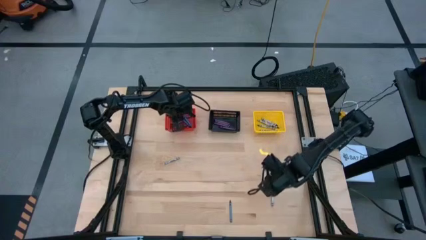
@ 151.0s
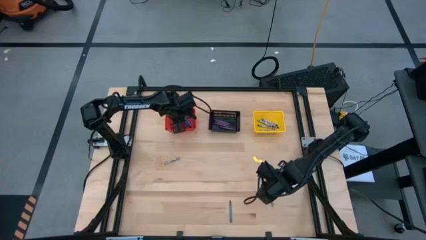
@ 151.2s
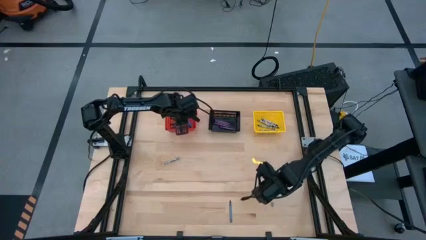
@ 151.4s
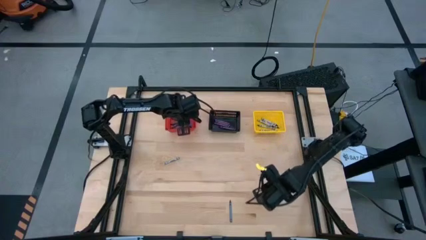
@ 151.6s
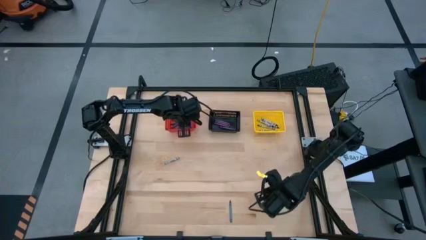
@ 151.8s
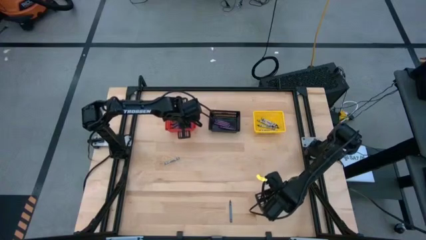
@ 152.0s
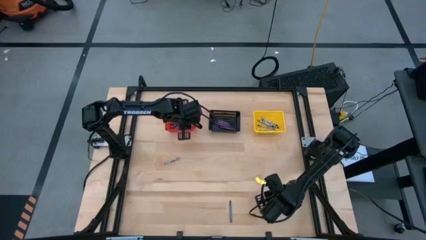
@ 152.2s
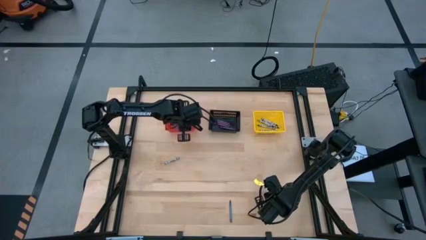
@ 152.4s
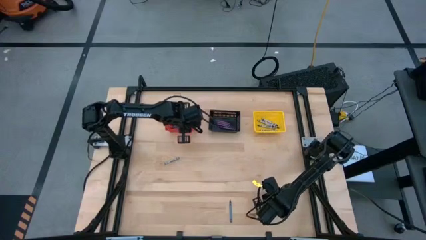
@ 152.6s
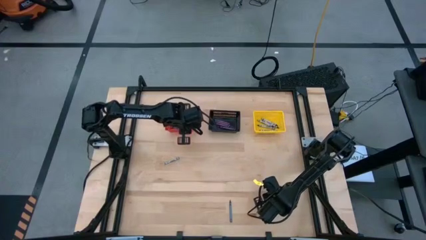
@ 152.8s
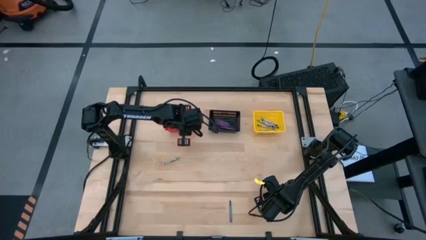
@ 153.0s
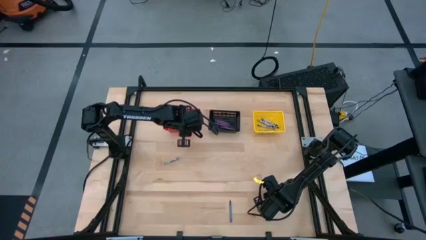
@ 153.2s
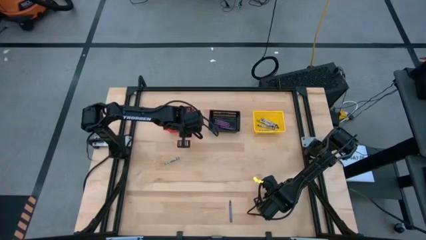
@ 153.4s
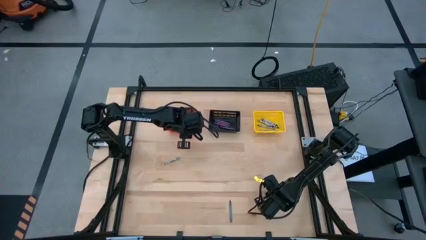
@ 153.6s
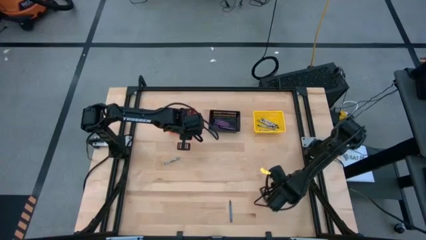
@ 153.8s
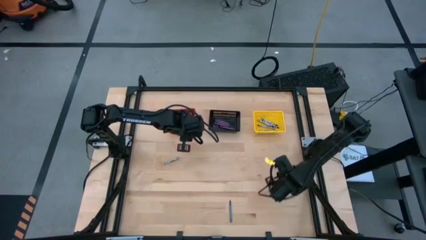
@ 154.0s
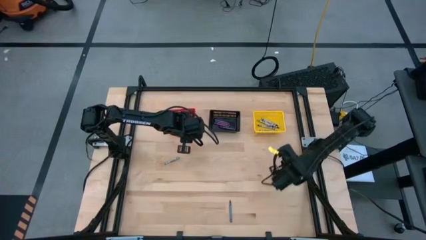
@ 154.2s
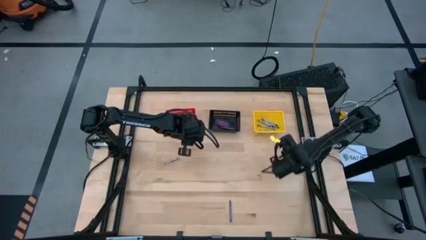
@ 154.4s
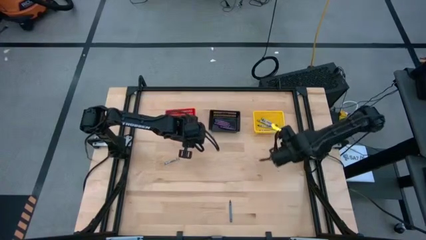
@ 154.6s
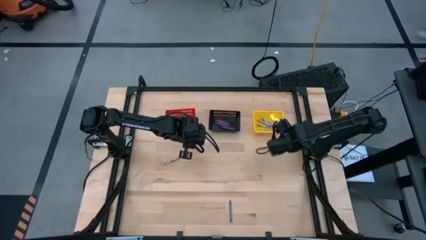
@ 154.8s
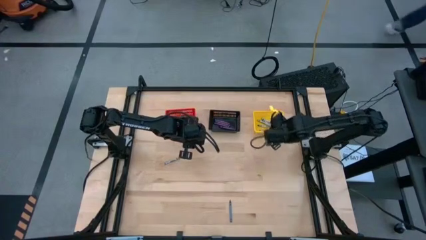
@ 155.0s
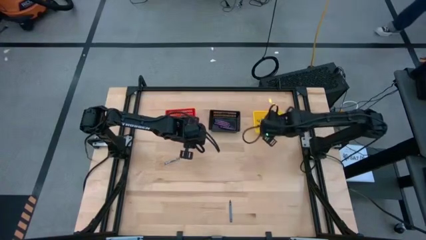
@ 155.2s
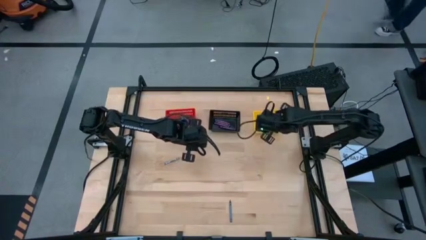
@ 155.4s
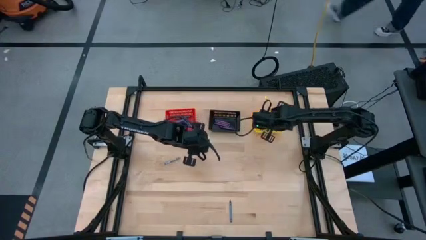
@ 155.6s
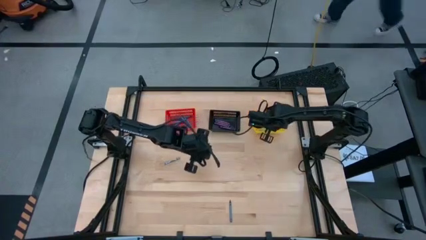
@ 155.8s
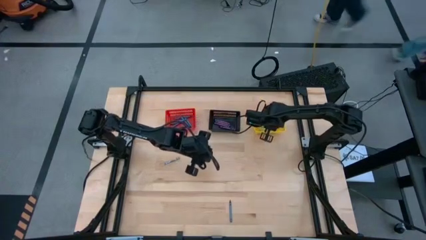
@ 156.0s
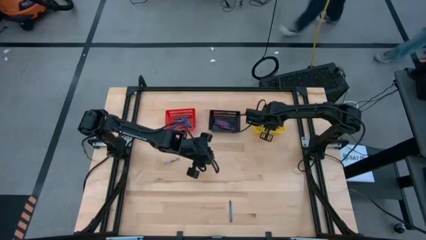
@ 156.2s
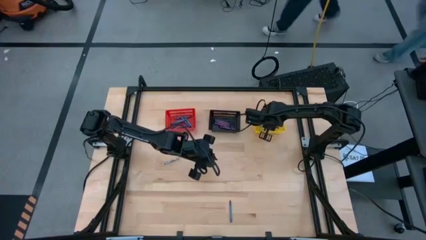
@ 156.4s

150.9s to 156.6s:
Task: Sort crayons
Put the black crayon into the yellow bin

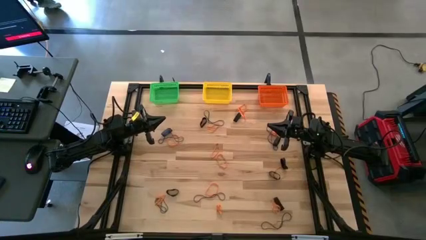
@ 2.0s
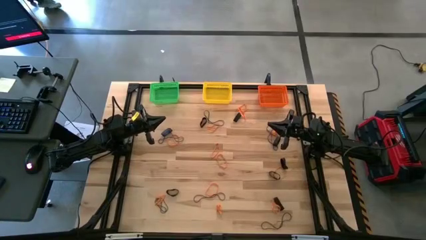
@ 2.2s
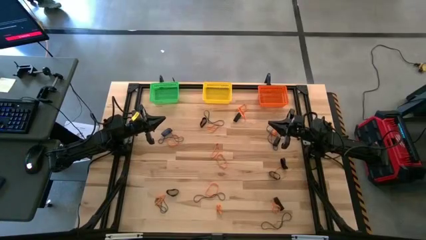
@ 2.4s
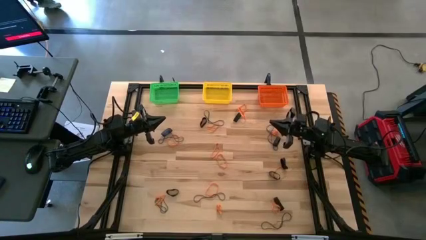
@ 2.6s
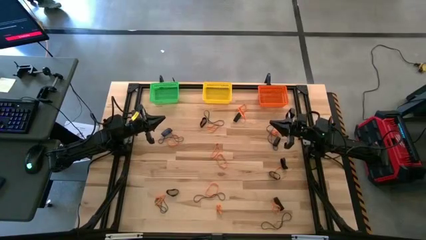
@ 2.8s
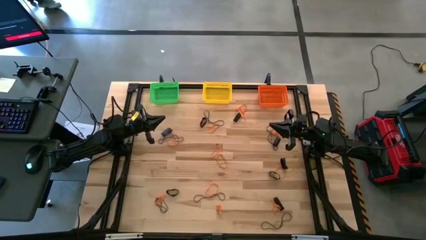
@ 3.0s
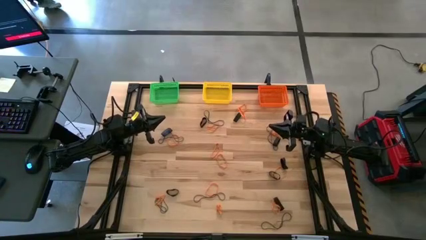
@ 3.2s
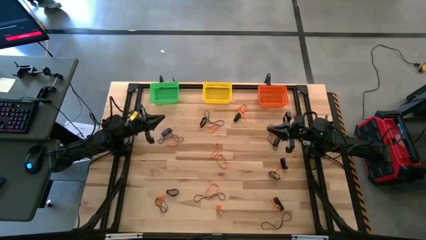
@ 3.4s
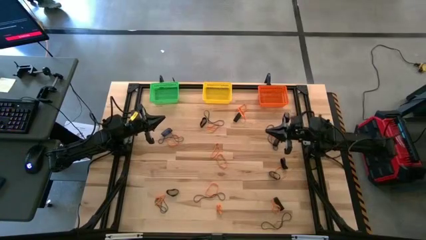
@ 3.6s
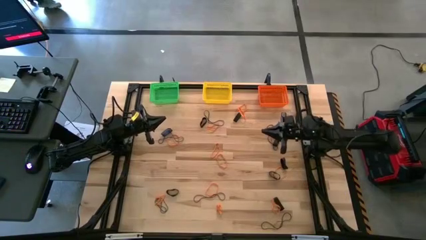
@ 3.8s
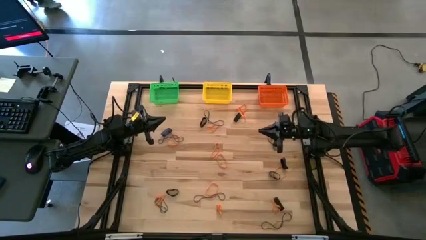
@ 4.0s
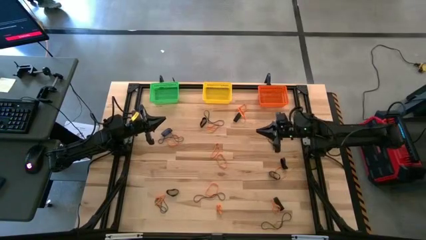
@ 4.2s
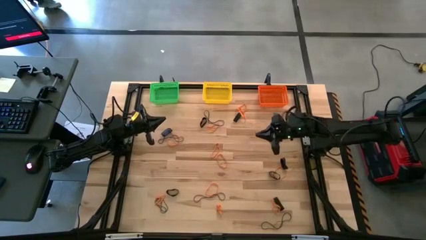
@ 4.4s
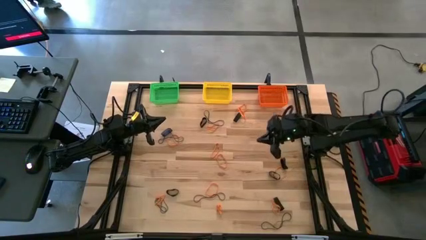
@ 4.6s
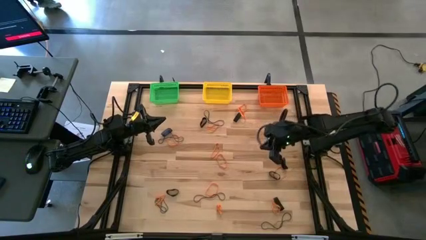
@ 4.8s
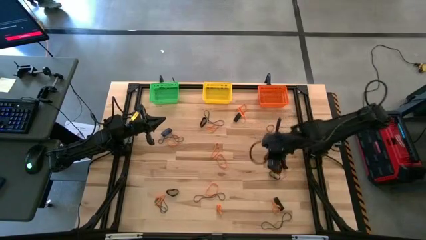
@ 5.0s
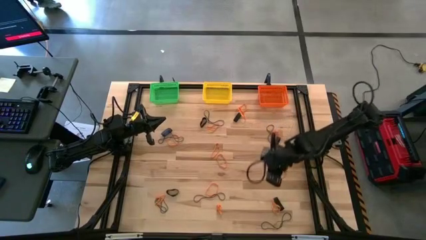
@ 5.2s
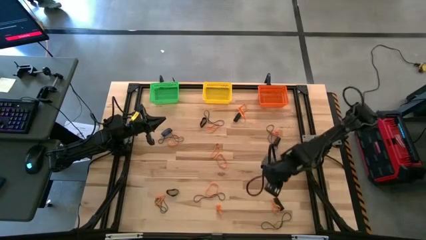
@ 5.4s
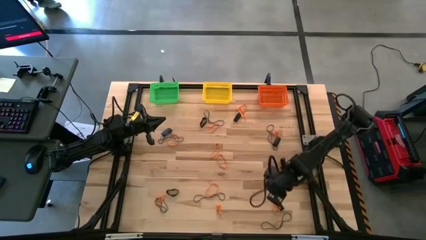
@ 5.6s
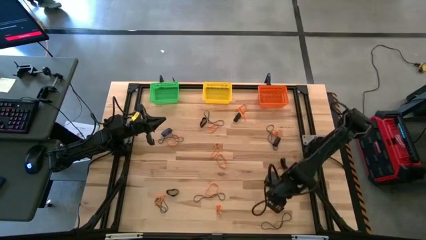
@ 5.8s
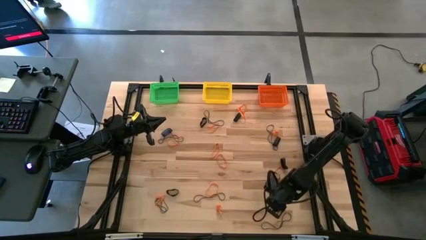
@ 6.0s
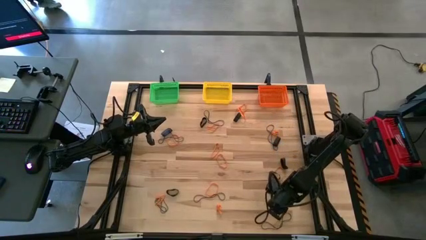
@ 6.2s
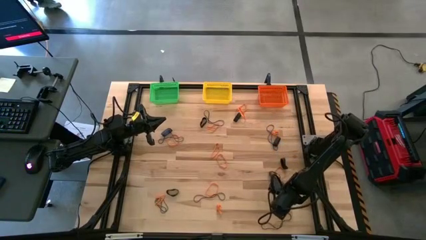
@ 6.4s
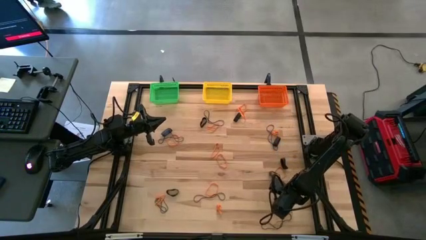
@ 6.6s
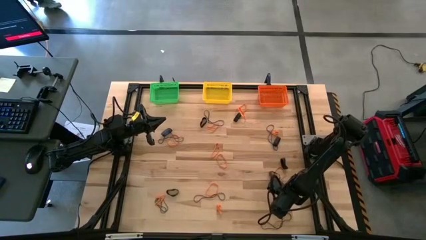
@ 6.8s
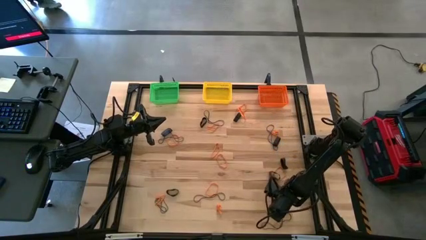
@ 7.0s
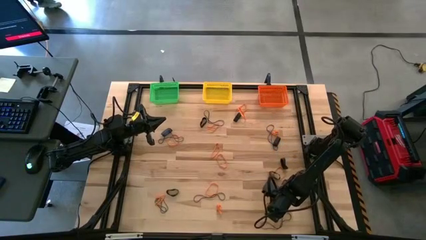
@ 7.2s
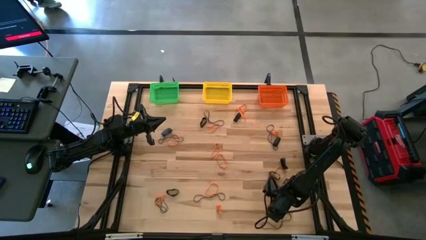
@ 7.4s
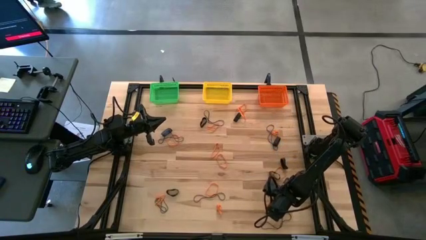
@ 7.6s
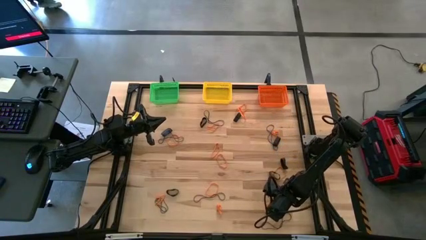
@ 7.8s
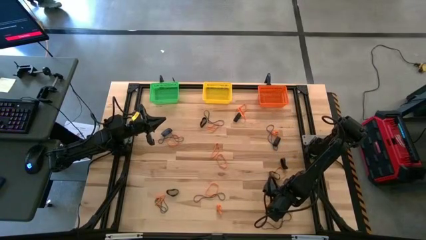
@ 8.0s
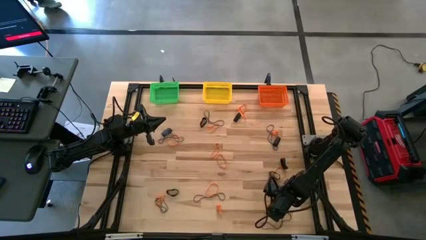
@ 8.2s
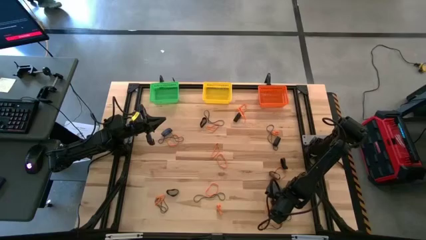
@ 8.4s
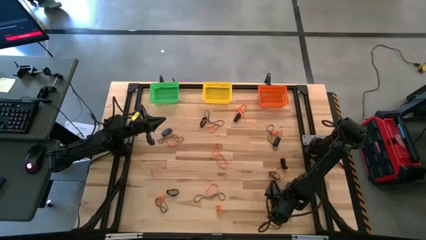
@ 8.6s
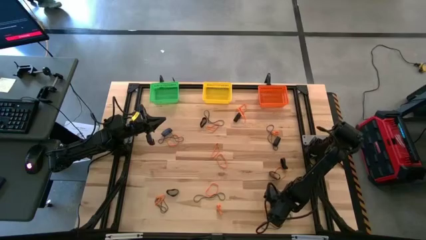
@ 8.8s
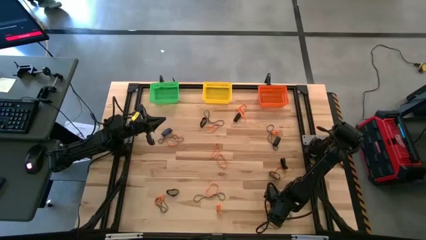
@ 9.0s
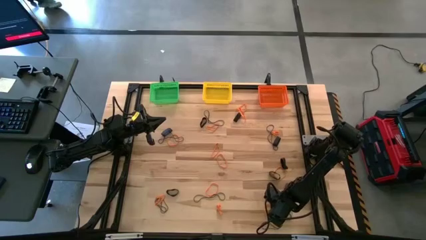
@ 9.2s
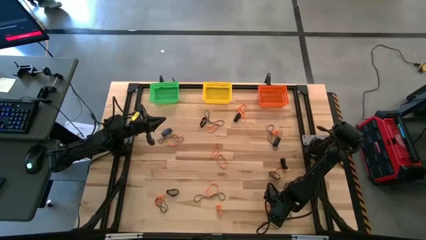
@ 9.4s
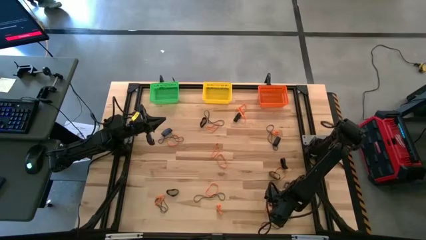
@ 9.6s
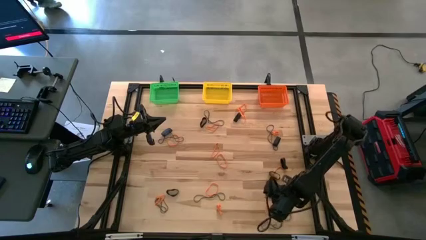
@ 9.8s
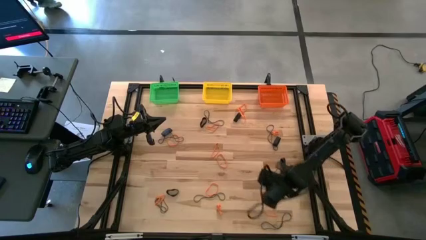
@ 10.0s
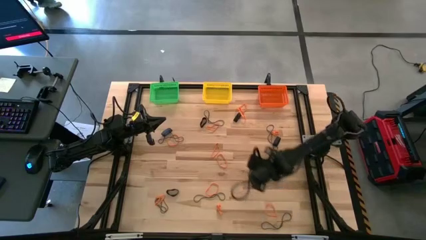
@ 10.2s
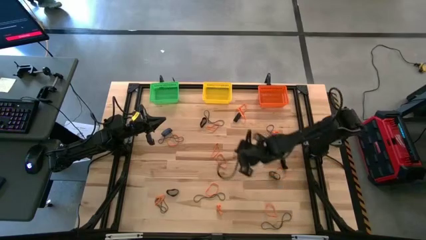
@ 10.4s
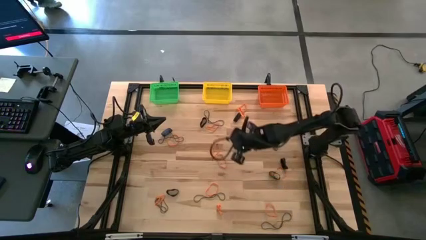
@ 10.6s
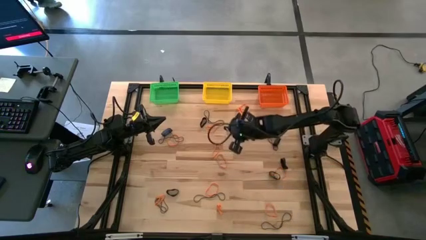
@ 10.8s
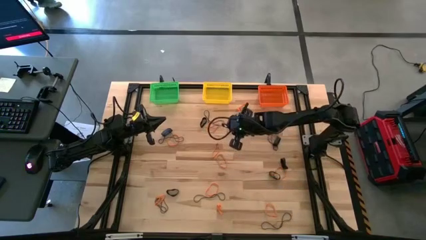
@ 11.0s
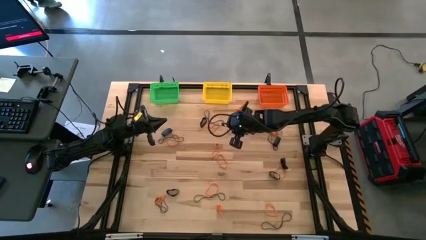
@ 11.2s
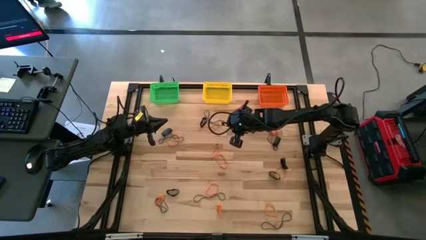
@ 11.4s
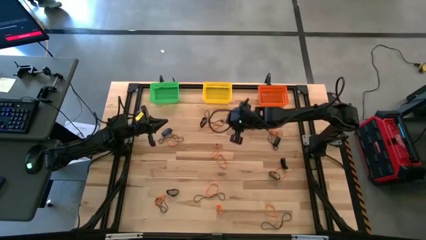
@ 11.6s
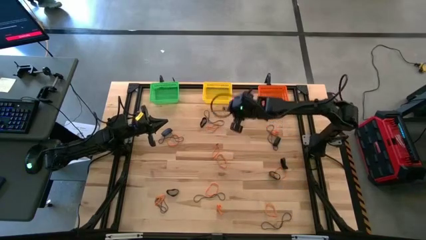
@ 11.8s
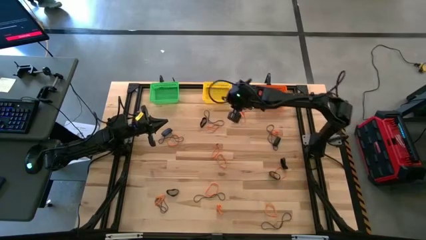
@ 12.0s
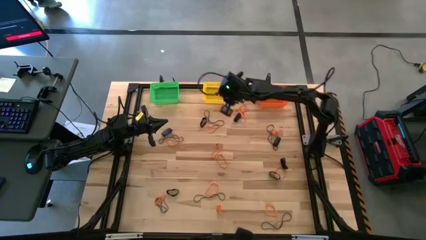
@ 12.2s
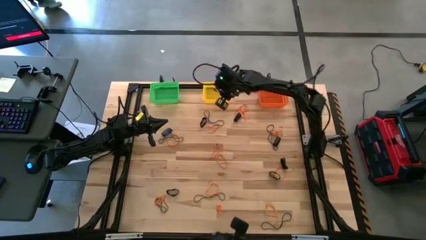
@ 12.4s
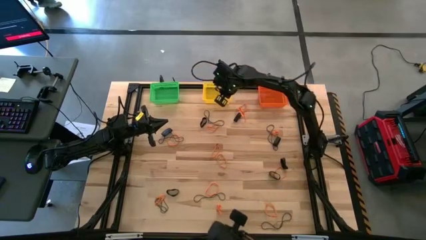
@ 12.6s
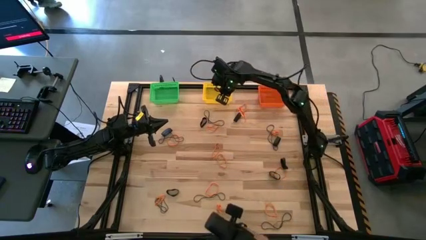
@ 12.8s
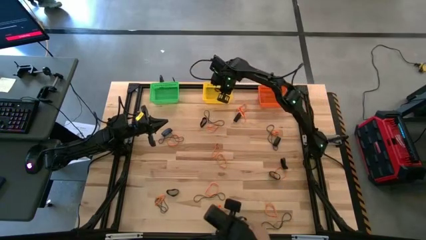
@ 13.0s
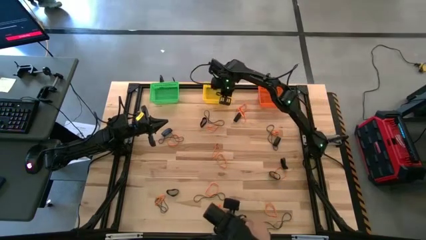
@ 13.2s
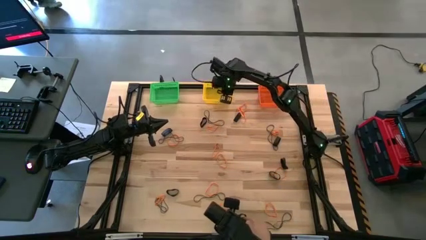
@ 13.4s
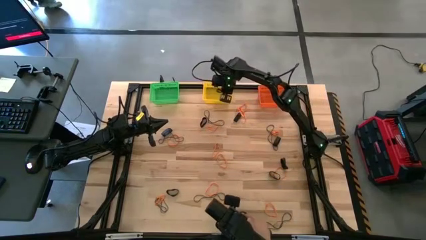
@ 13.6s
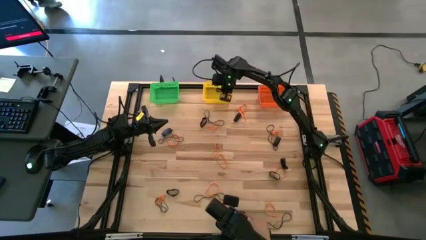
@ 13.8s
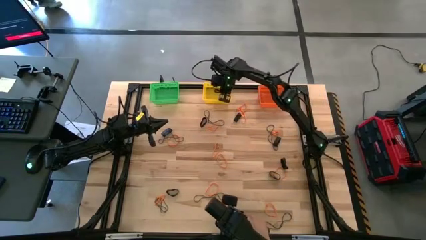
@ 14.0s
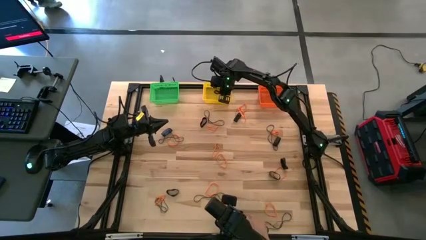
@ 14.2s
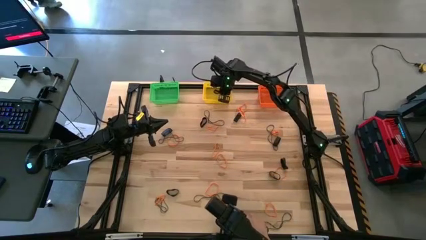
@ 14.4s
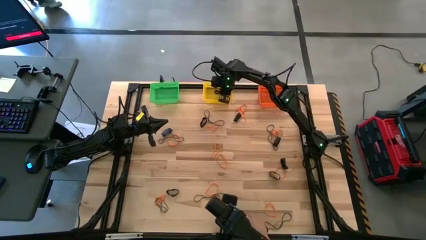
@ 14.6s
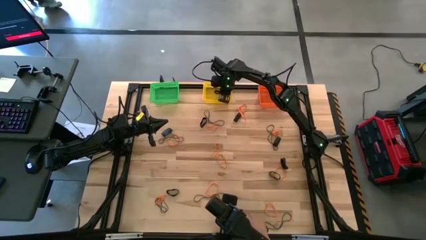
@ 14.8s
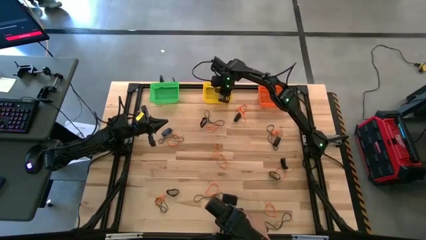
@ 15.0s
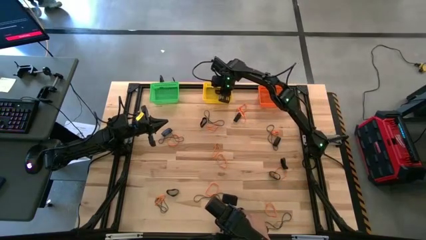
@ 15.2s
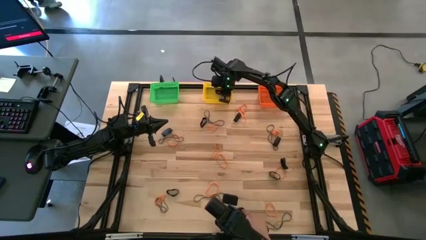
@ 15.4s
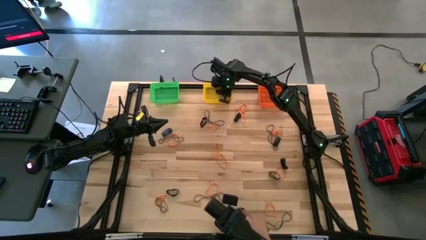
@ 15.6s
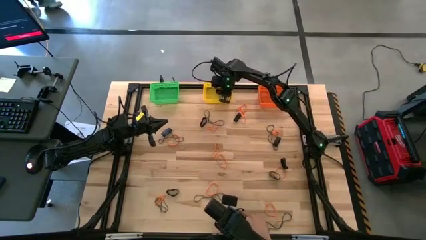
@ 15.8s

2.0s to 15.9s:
Task: Sort rubber bands into baskets
Put the black rubber band into the yellow bin
